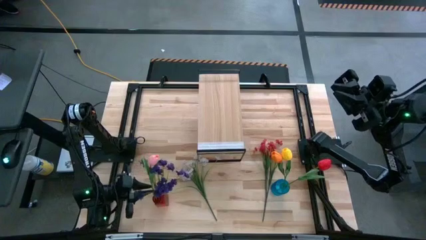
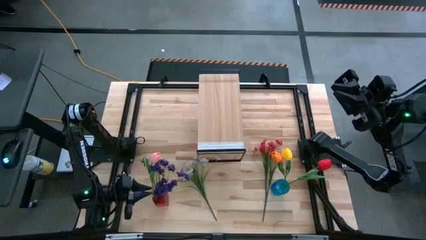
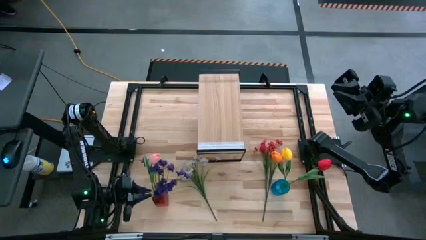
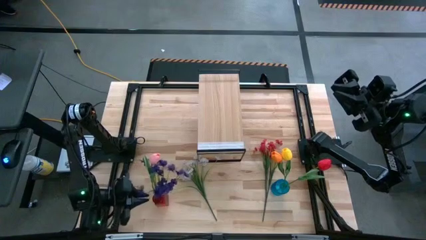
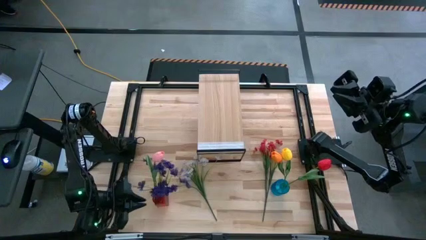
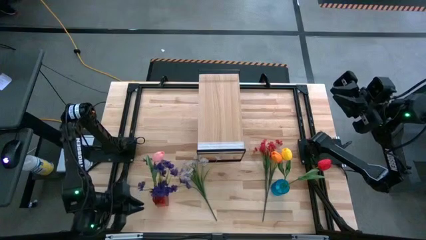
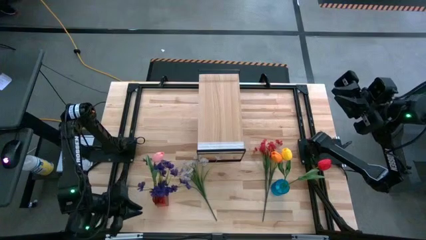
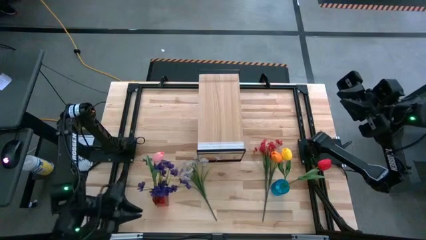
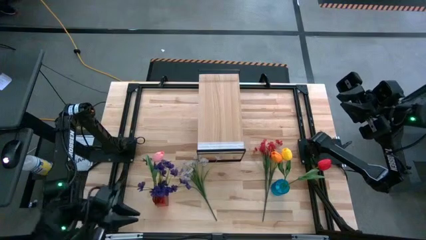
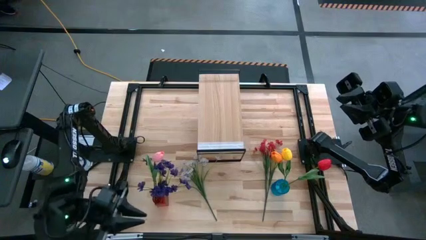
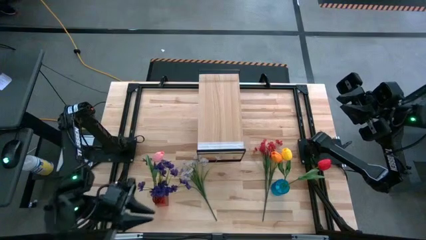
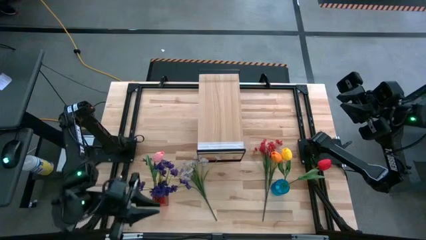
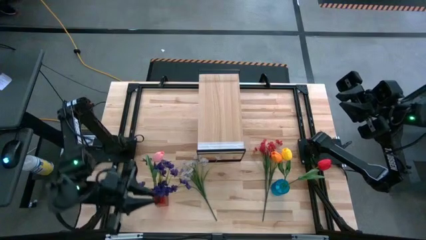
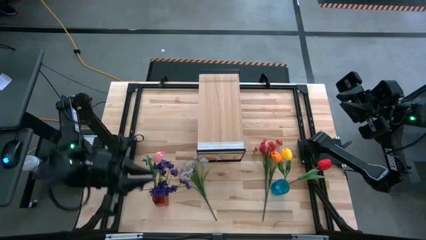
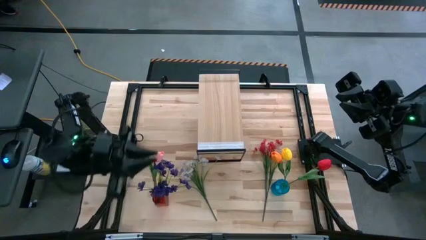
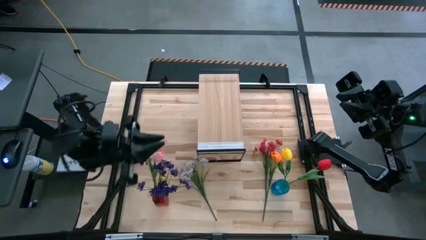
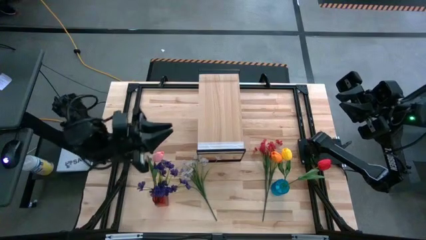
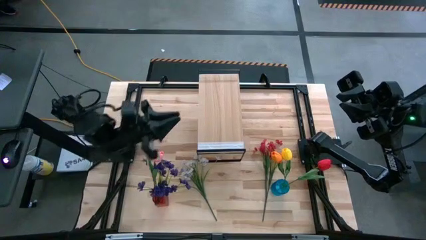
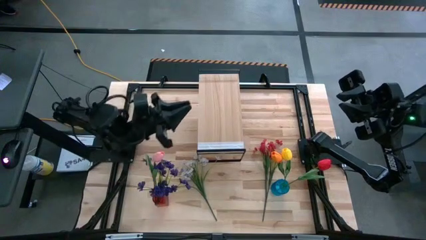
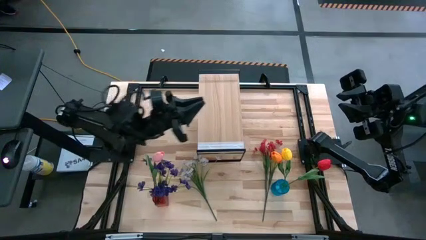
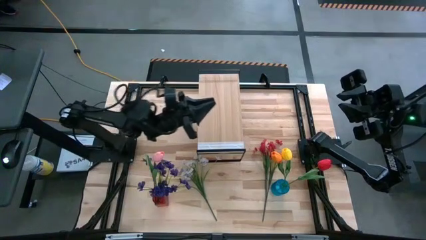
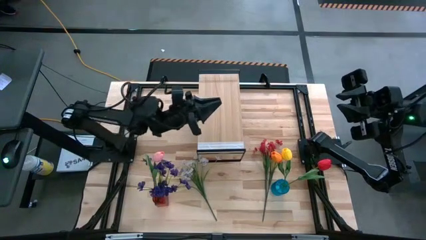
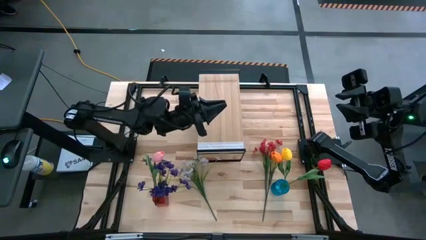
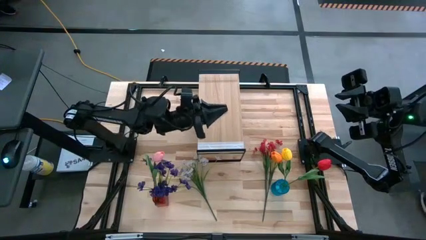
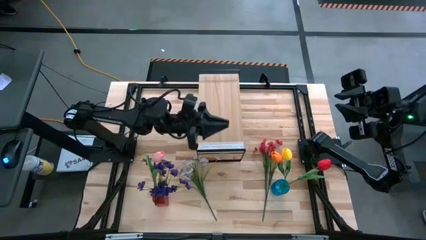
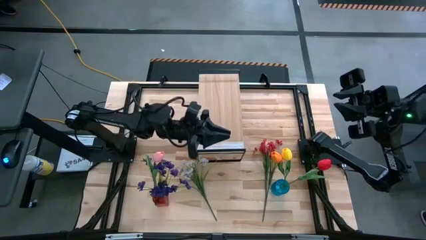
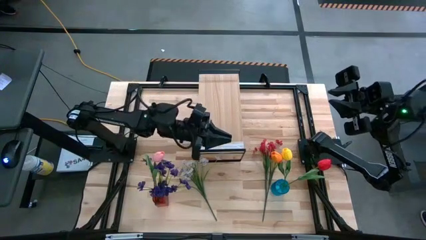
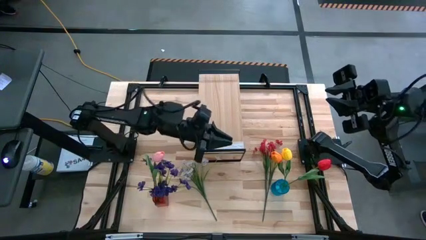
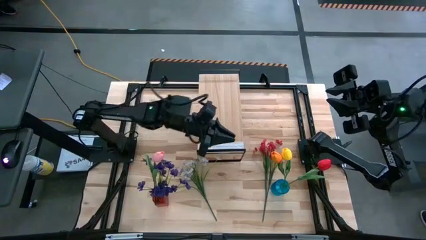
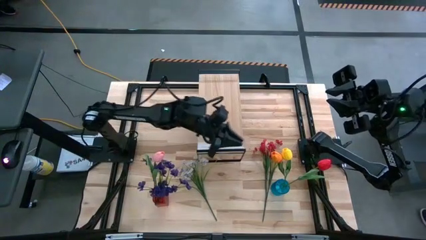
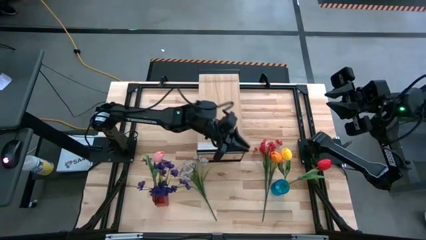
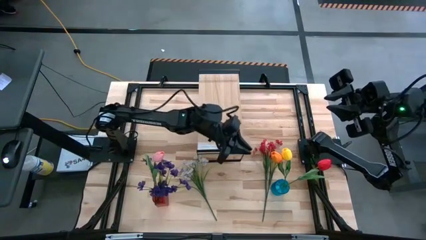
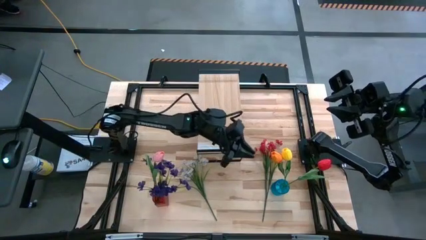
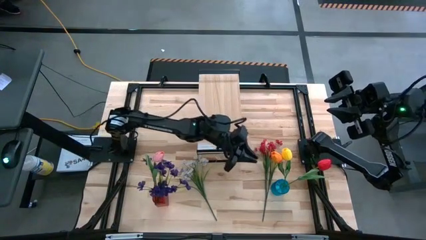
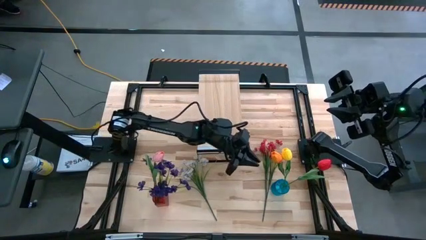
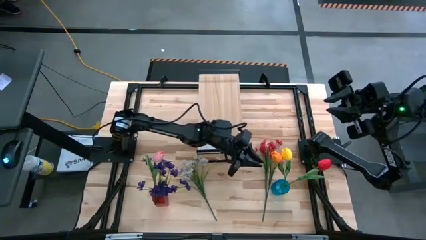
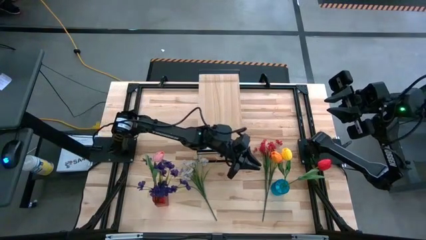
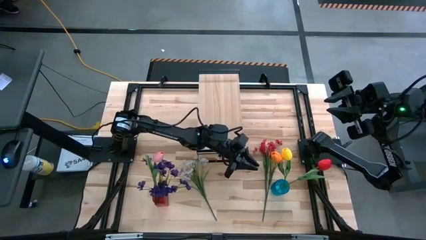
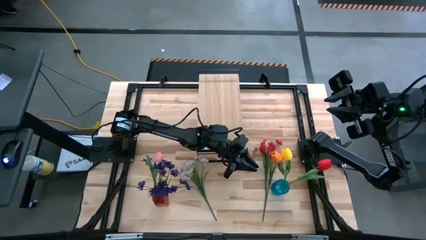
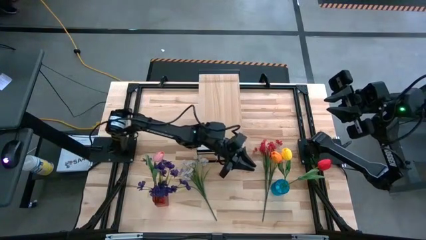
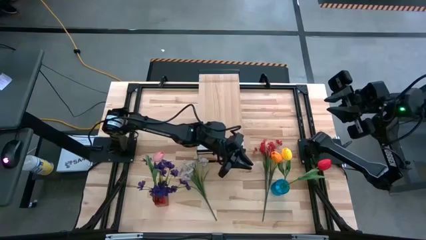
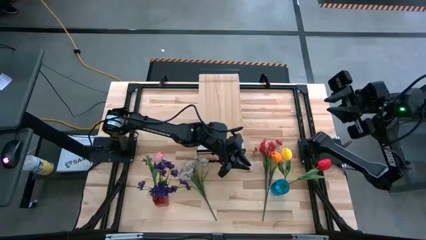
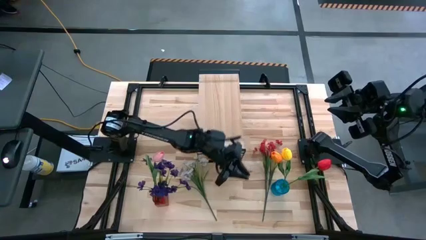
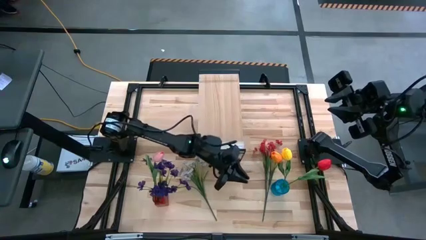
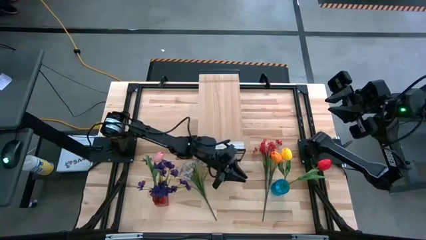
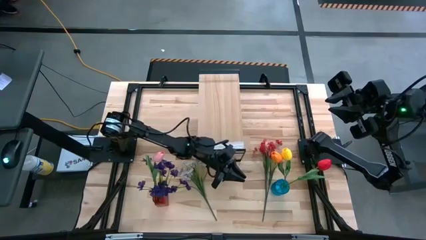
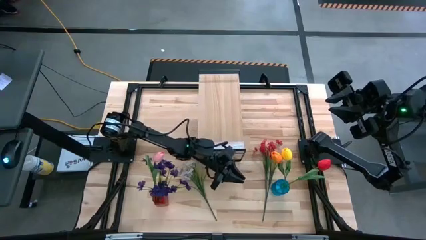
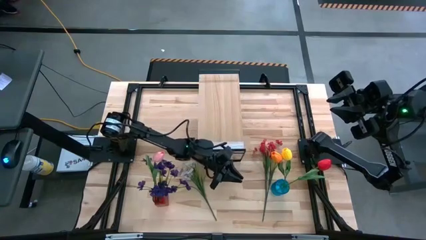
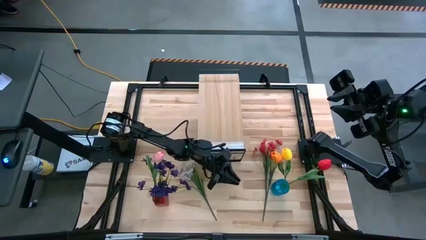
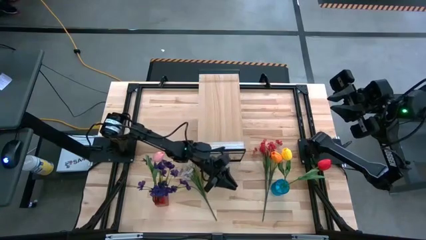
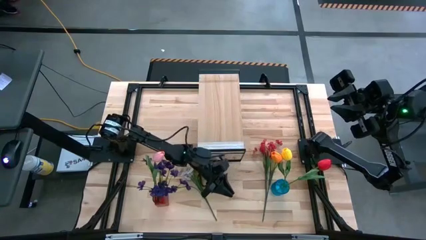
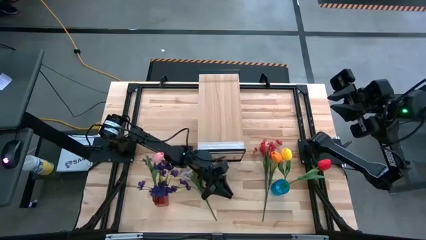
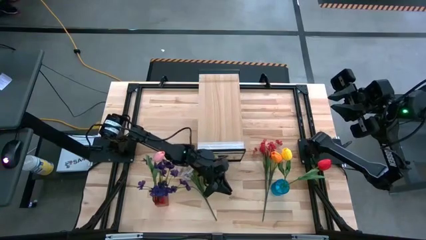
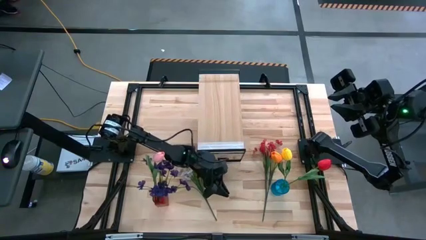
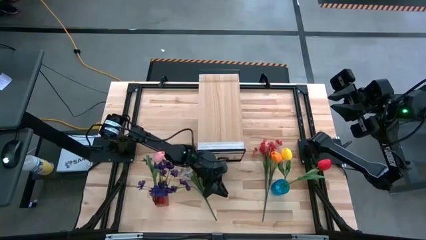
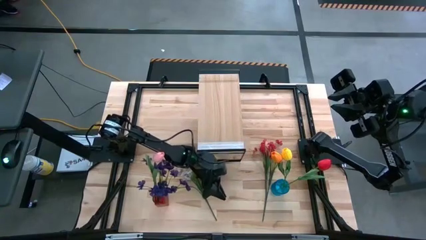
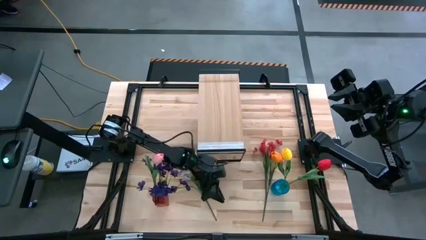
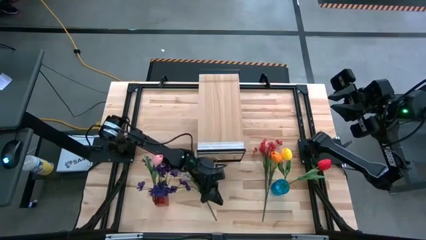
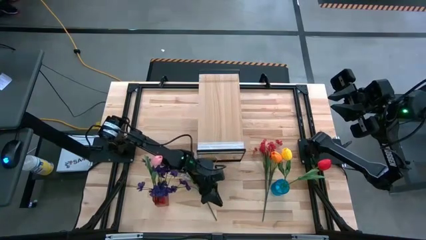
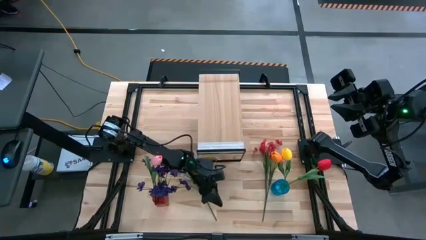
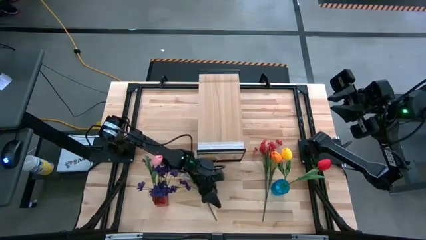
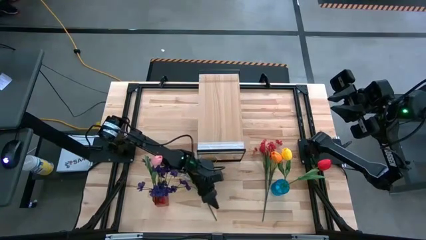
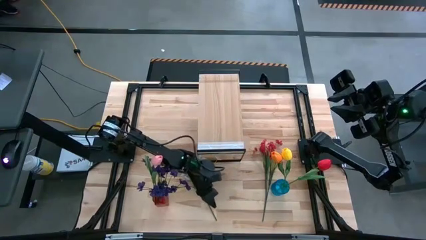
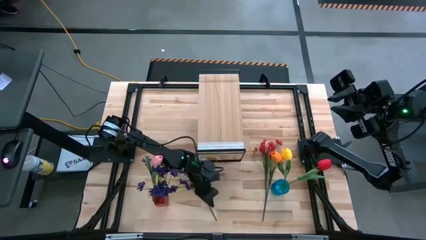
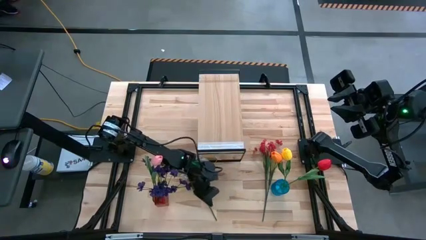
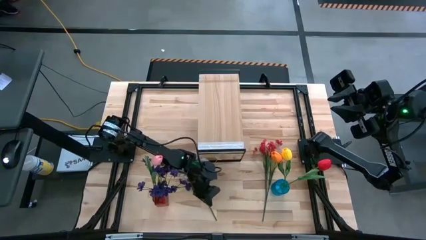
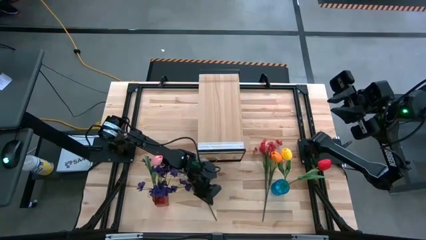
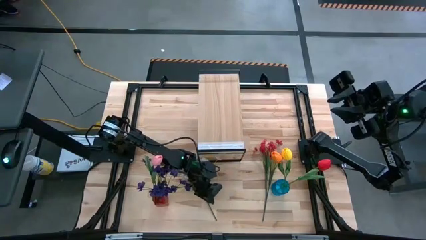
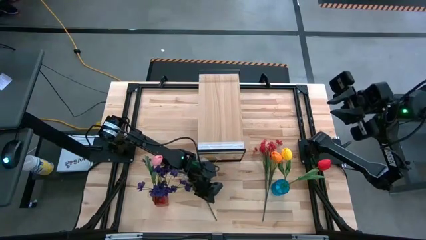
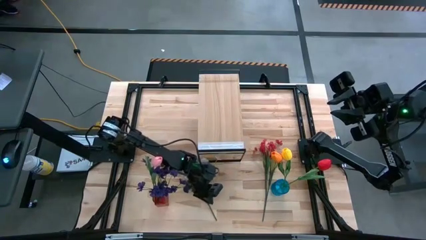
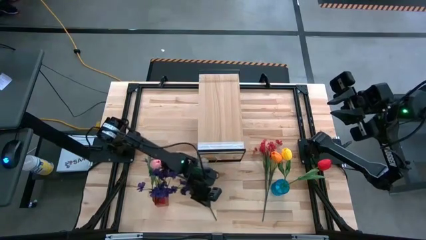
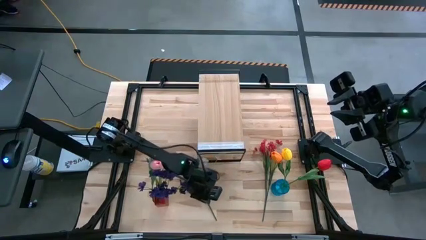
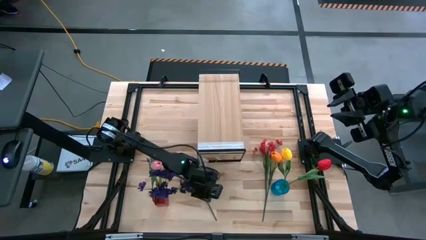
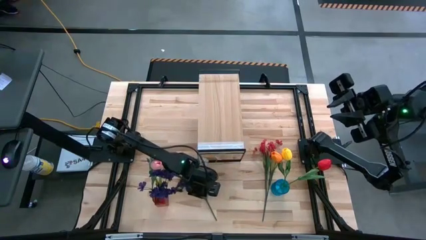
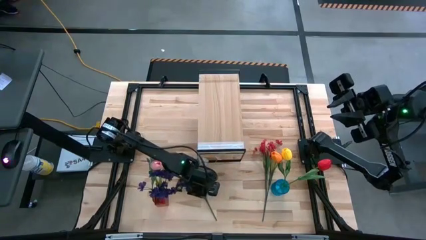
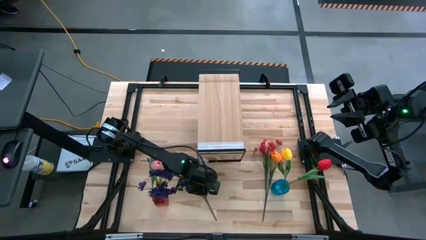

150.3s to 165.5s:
Task: Pick and place flowers into a vace then onto a shelf
Put the white flowers into the red vase

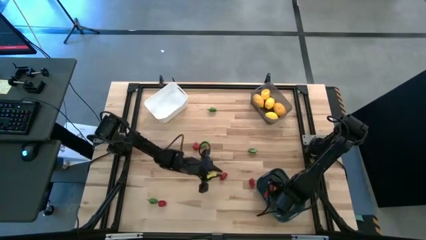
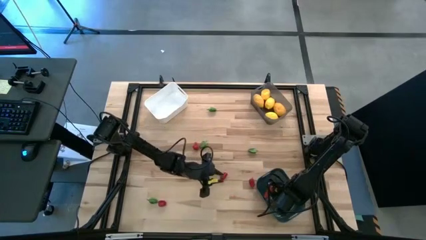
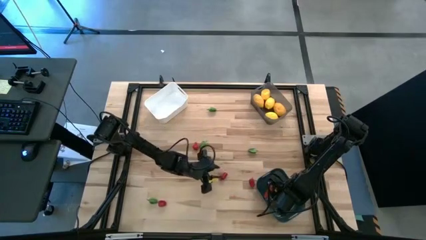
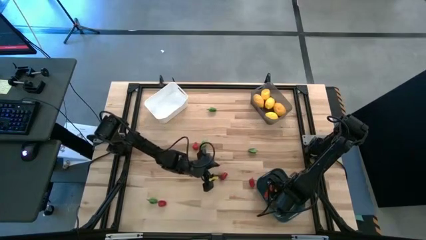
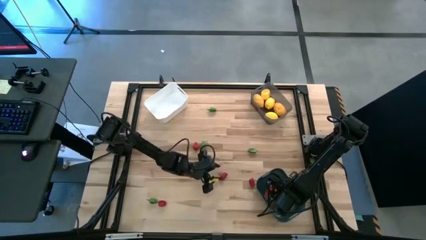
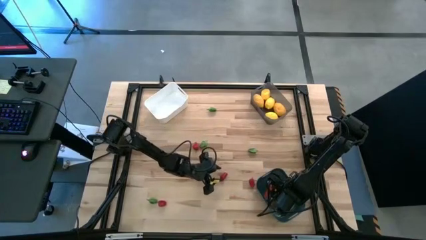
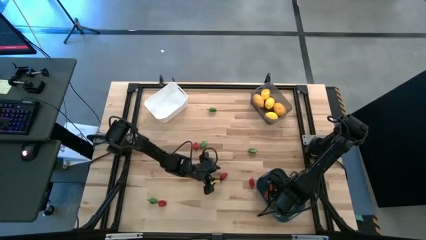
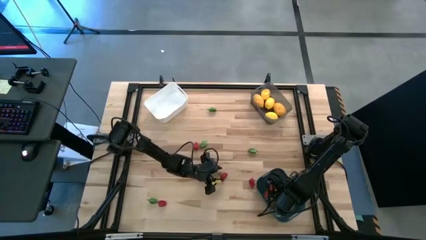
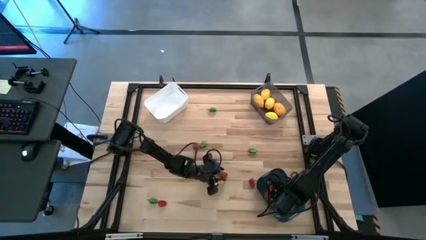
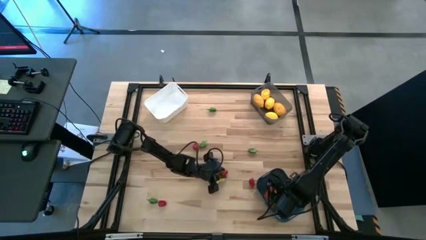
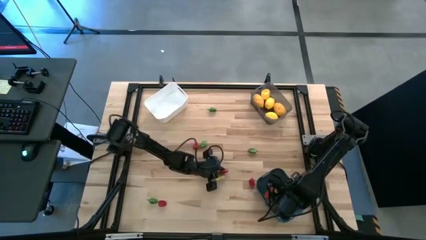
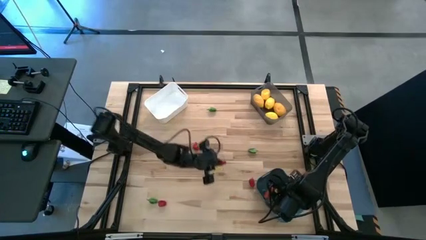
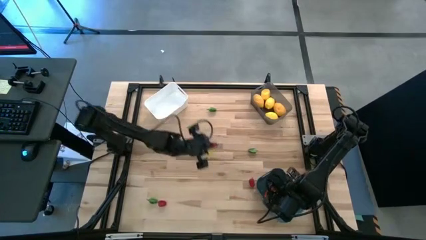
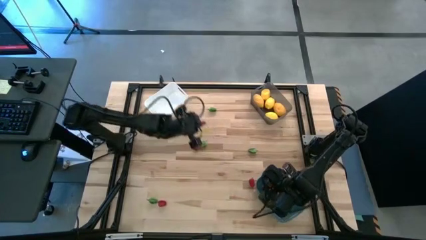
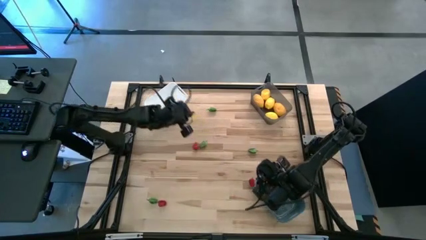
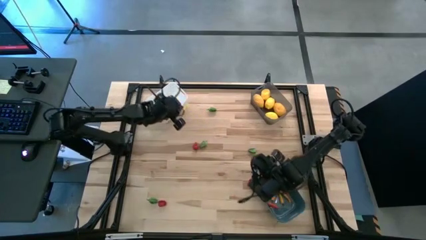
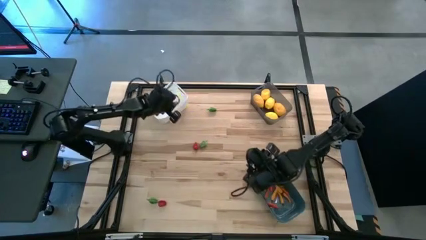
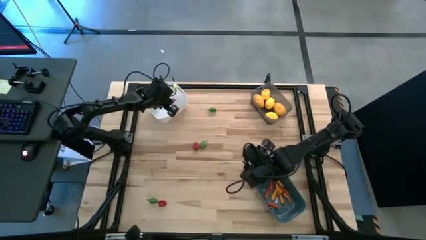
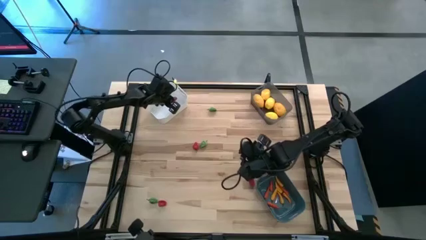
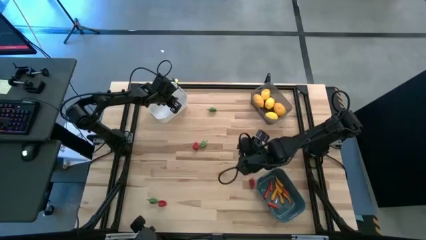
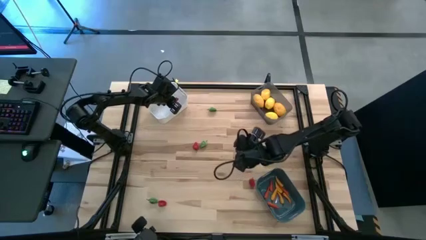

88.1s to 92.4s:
Task: Sort produce into baskets
Put the red chili pepper into the white bin
